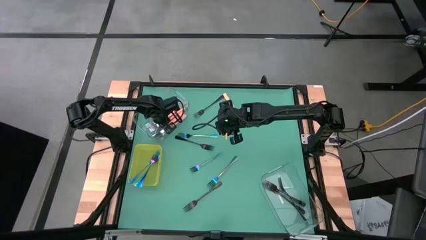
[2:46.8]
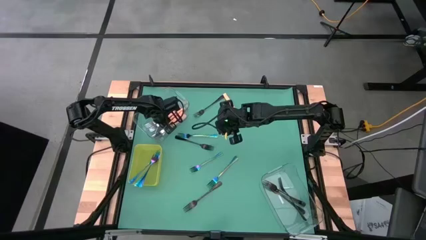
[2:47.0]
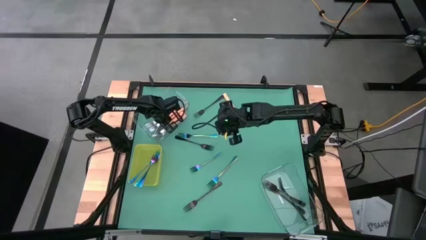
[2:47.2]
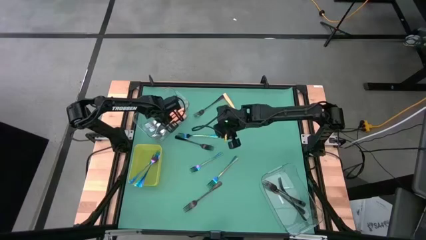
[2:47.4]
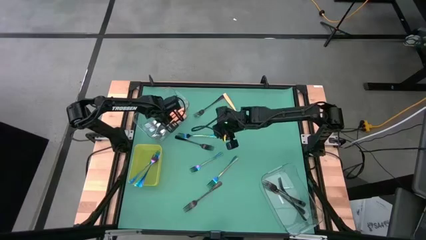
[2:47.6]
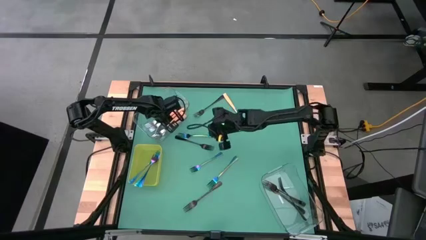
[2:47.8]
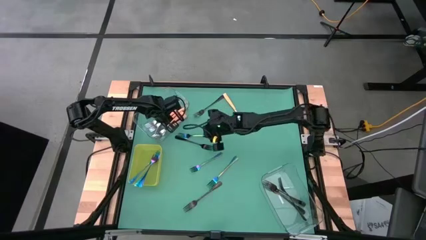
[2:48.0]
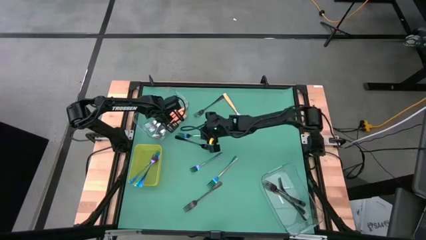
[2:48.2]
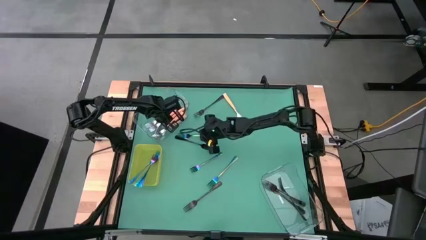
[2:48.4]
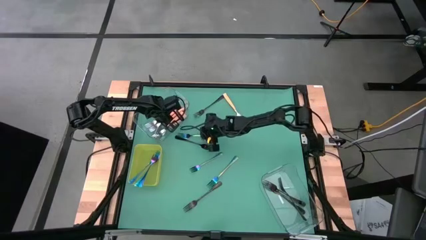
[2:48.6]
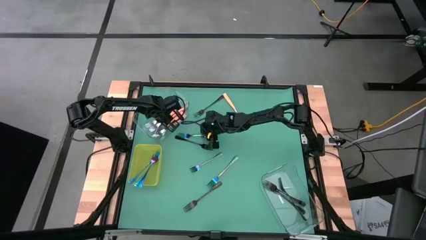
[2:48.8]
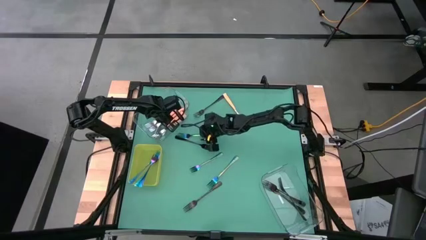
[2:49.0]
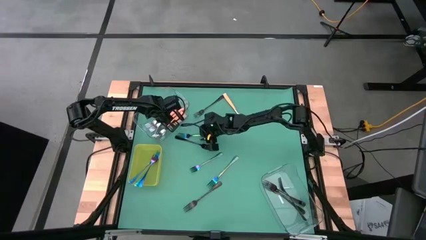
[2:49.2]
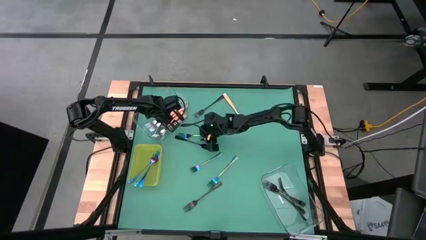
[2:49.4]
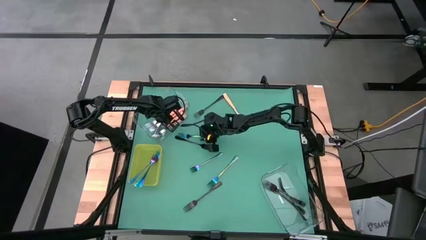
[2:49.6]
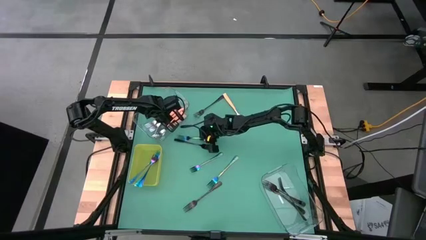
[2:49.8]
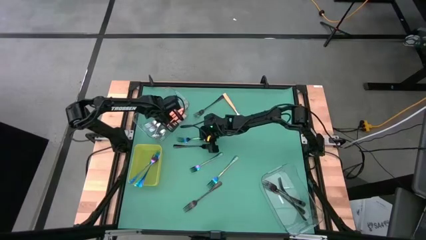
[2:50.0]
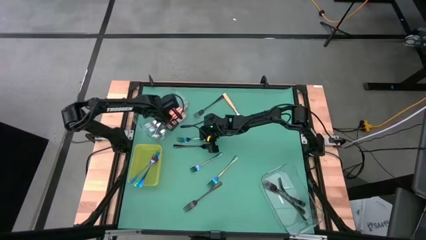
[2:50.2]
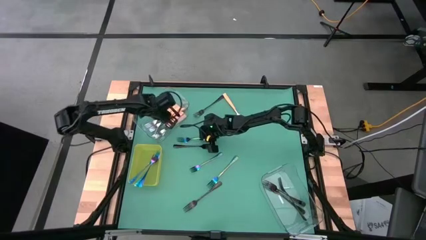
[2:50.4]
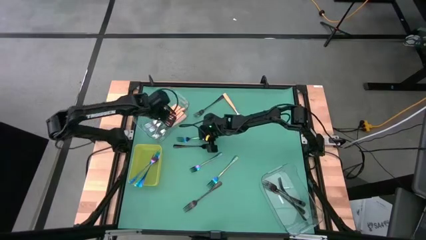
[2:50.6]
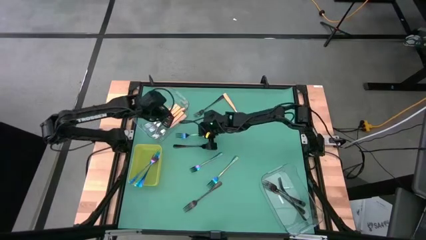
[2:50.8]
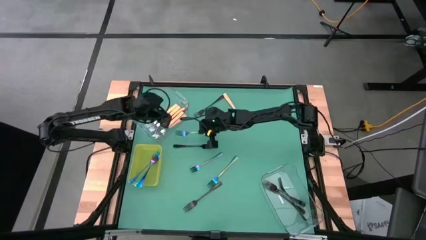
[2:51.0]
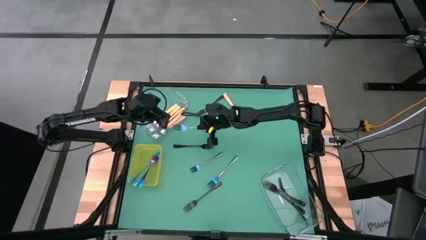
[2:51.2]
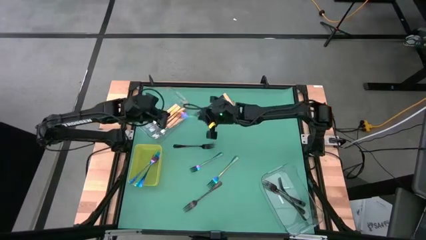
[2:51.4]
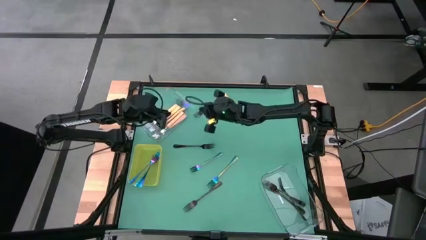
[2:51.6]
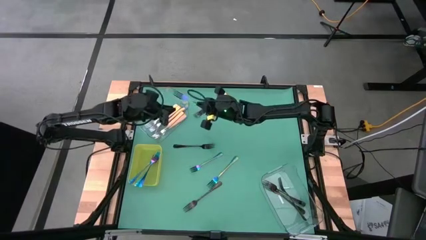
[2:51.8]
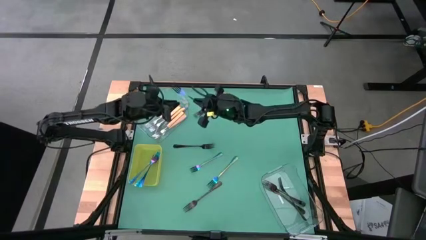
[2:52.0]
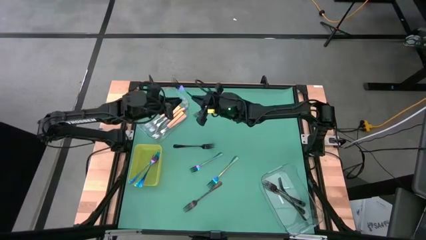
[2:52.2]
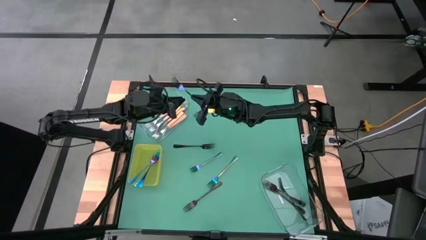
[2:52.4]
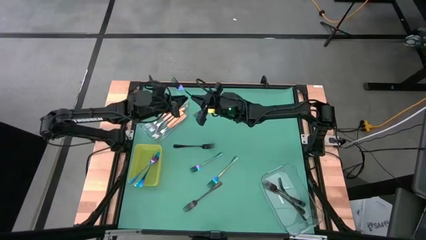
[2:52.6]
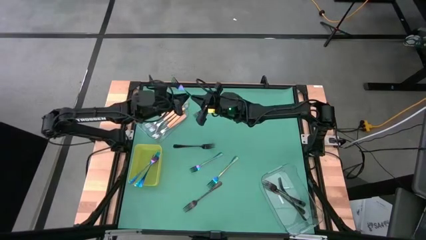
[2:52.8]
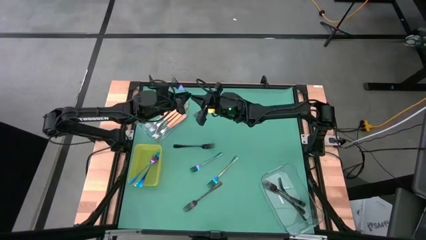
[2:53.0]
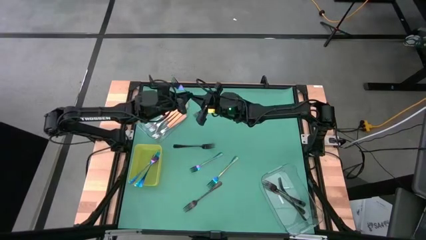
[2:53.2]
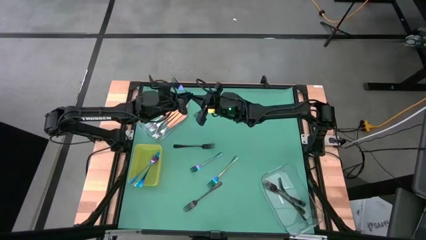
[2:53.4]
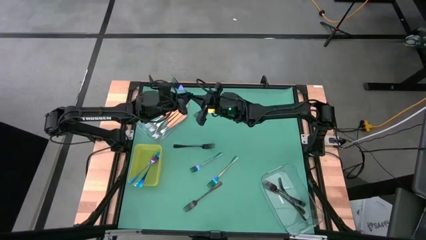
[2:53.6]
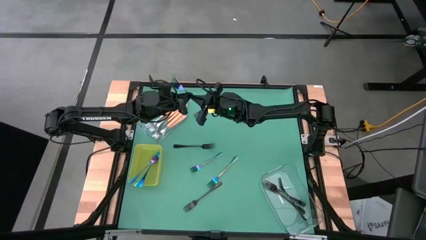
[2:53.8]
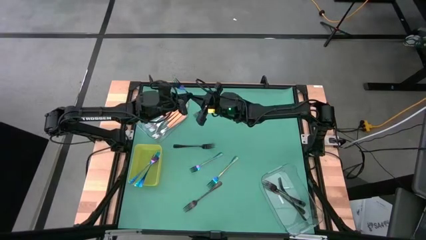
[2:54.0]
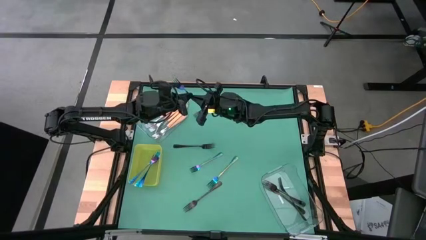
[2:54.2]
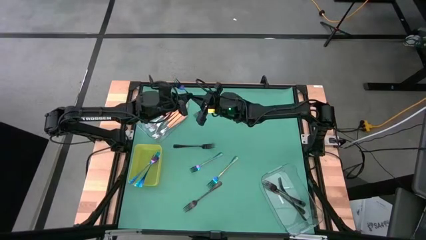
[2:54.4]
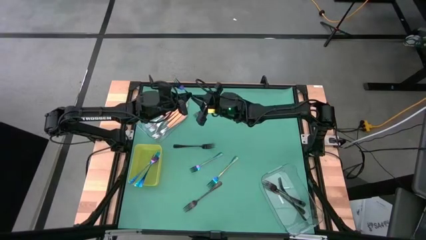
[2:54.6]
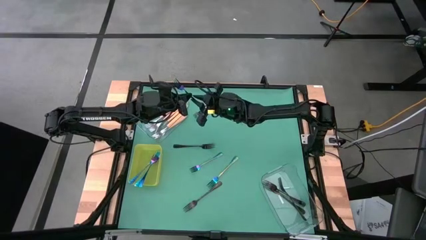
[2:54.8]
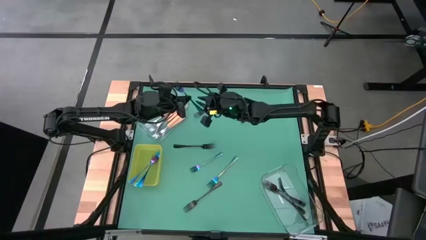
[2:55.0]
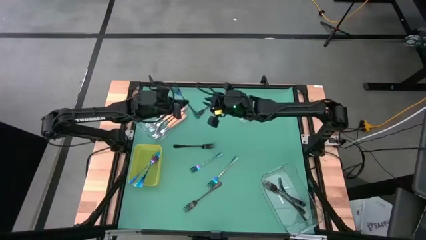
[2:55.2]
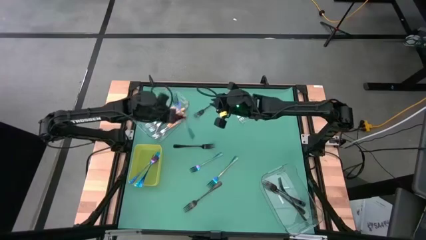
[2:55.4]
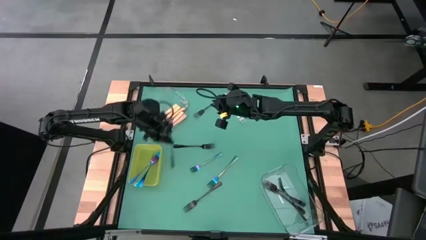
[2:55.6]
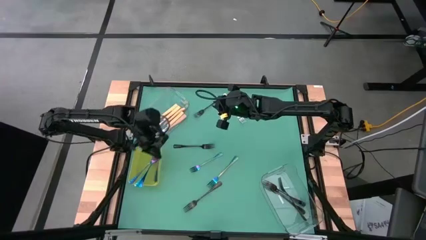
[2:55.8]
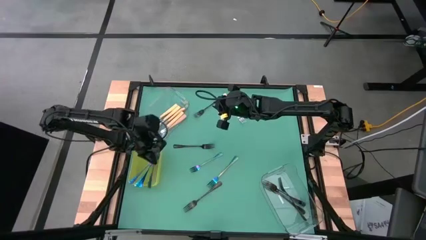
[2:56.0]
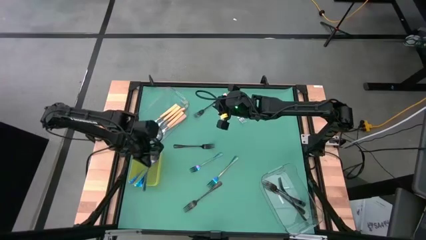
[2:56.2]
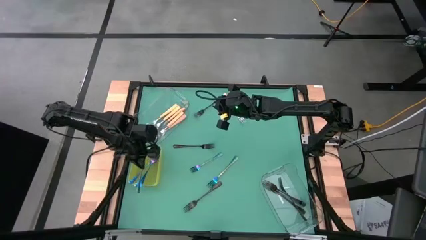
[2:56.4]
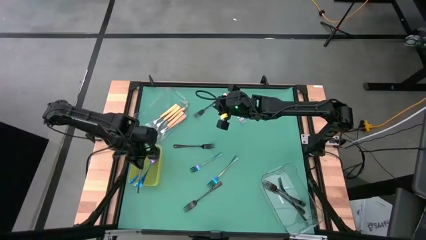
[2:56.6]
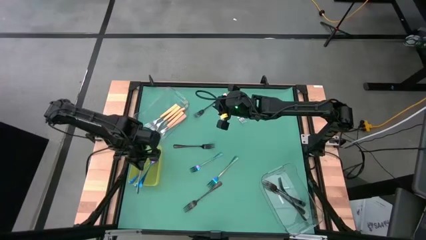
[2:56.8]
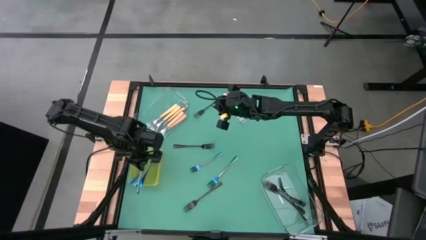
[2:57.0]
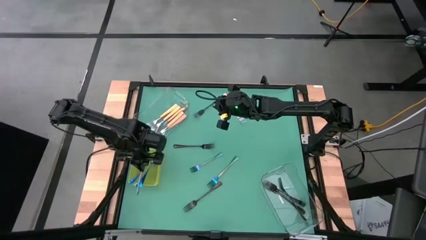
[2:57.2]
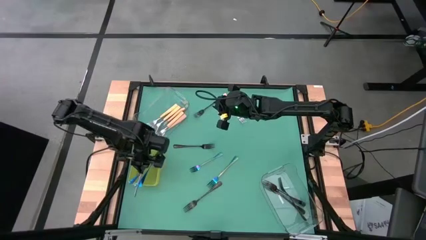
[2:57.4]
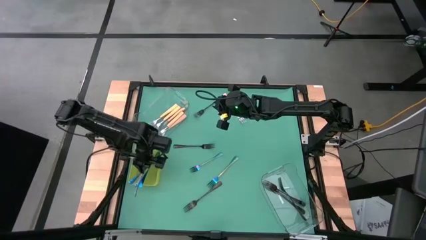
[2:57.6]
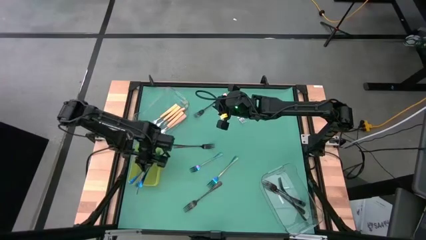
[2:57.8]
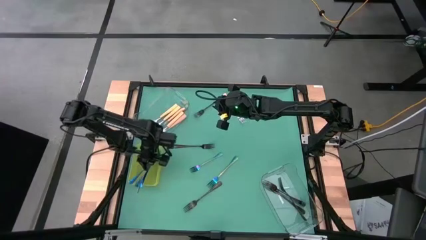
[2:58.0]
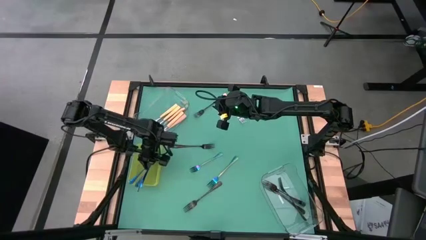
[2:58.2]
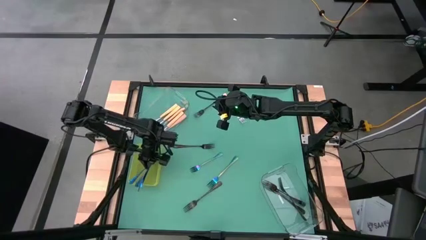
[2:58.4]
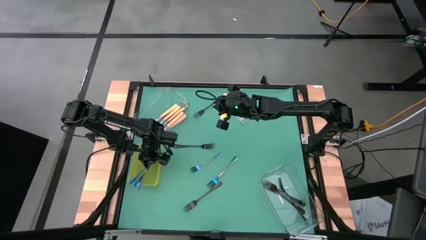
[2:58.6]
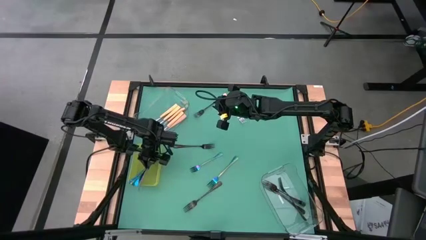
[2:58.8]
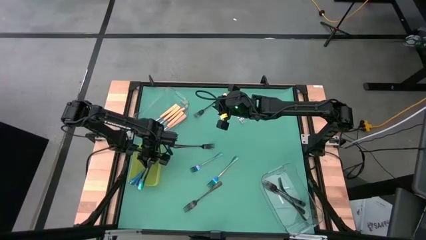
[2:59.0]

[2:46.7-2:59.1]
Task: Sort silverware by color (type)
Put the blue fork in the yellow bin
